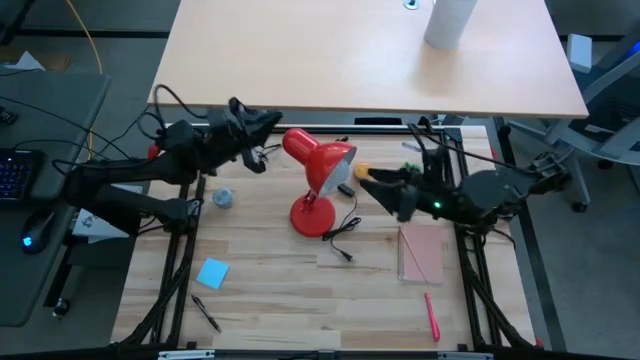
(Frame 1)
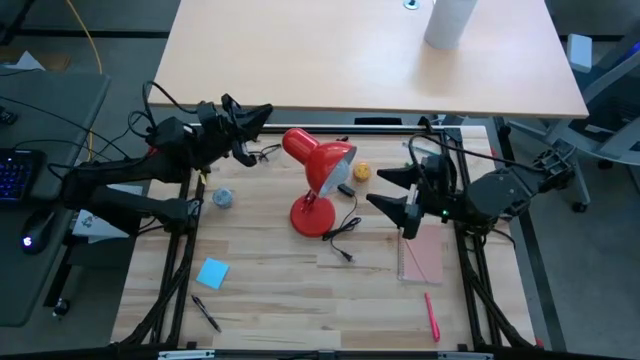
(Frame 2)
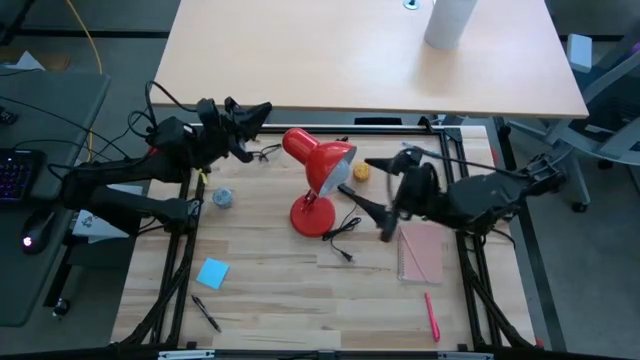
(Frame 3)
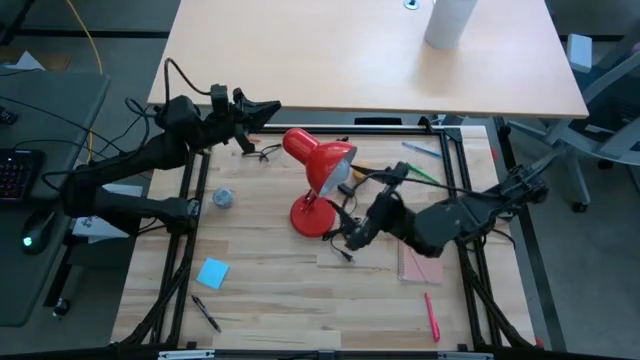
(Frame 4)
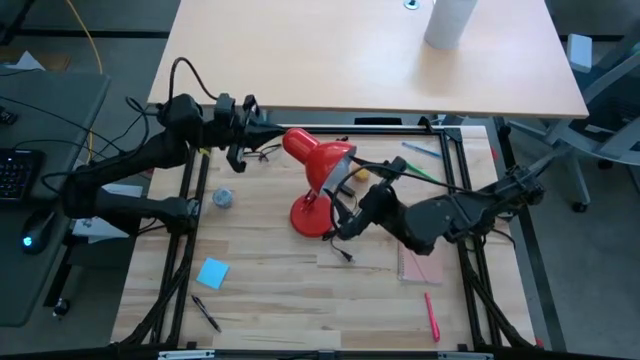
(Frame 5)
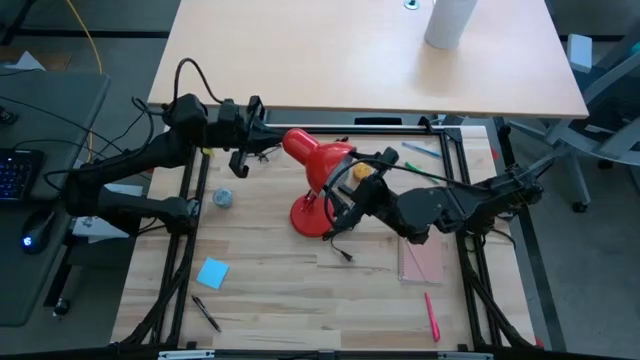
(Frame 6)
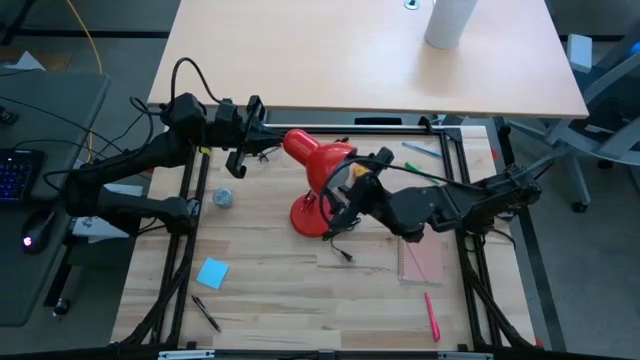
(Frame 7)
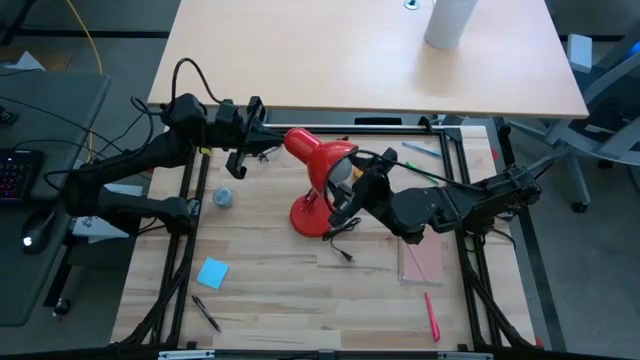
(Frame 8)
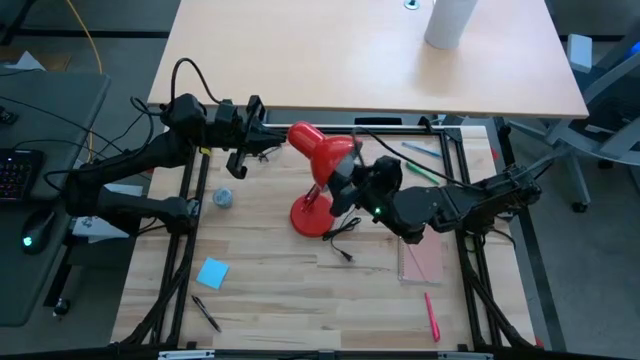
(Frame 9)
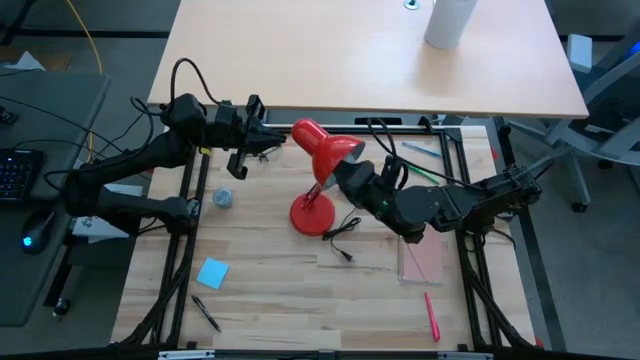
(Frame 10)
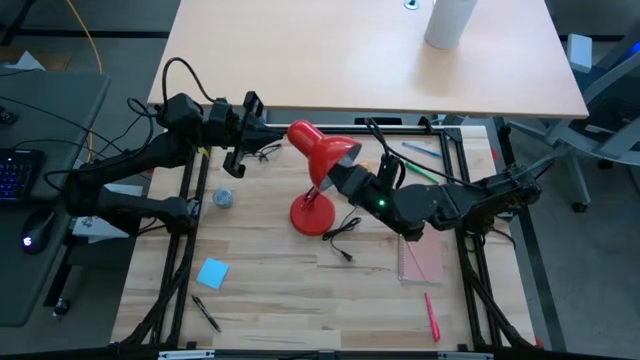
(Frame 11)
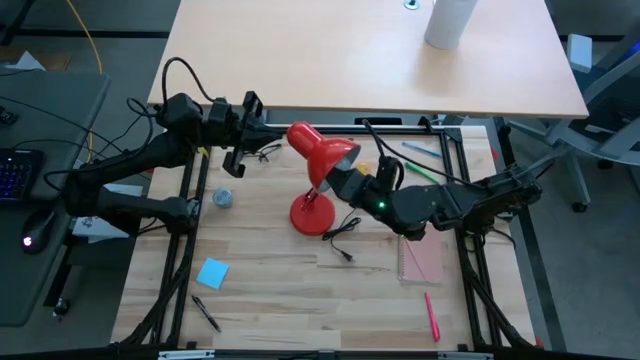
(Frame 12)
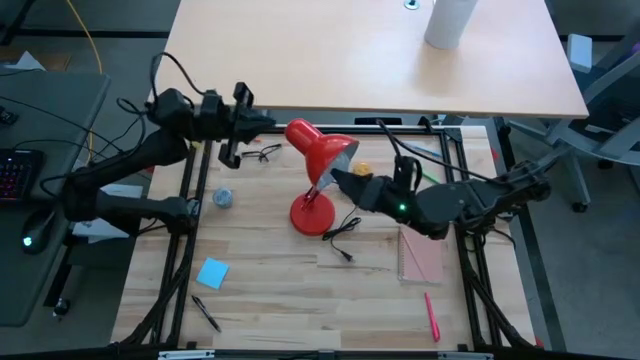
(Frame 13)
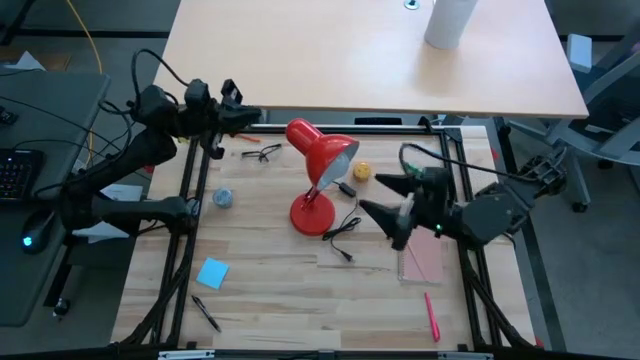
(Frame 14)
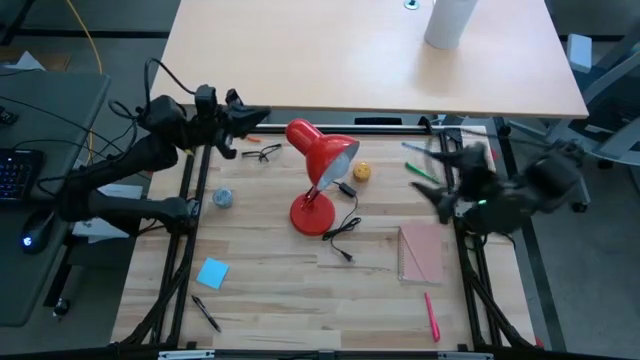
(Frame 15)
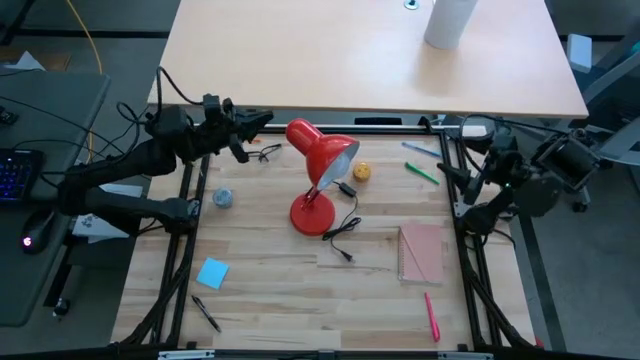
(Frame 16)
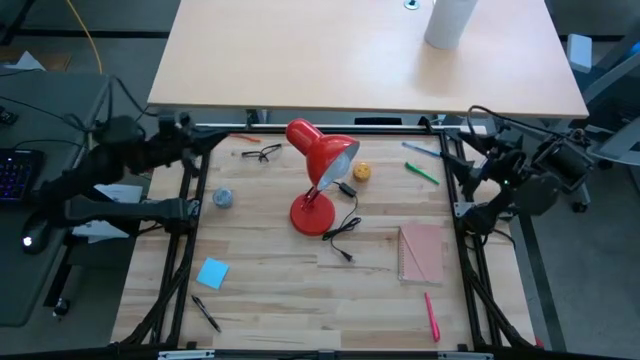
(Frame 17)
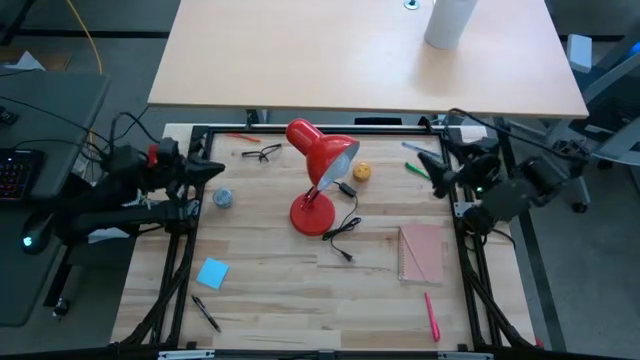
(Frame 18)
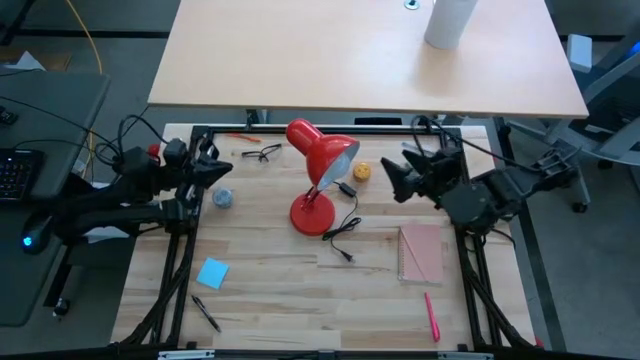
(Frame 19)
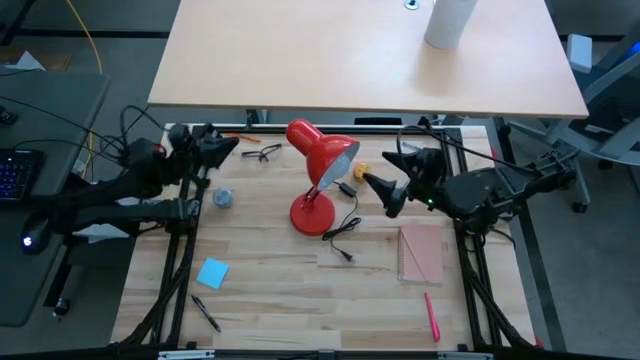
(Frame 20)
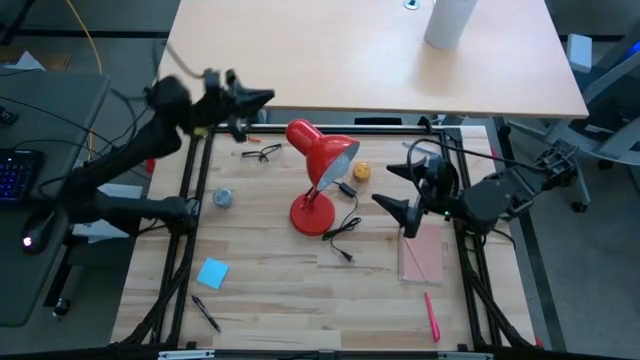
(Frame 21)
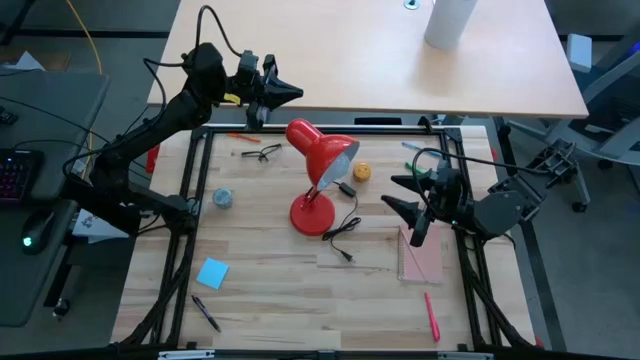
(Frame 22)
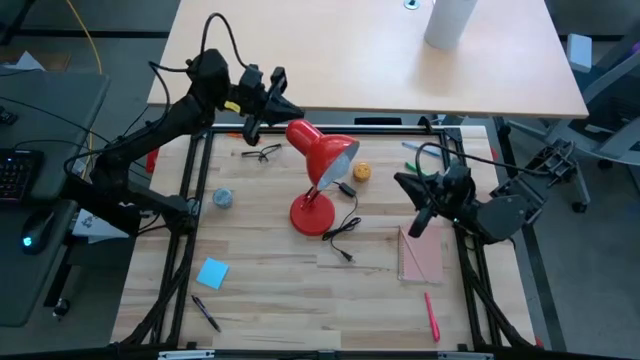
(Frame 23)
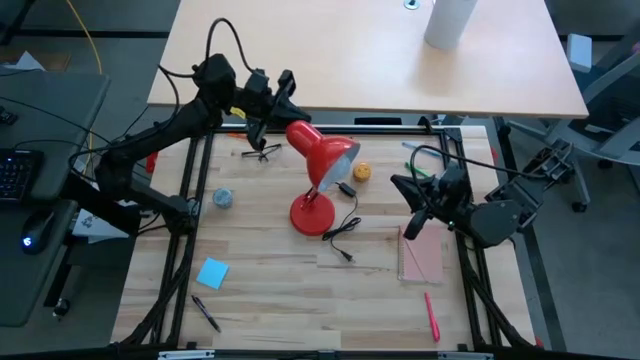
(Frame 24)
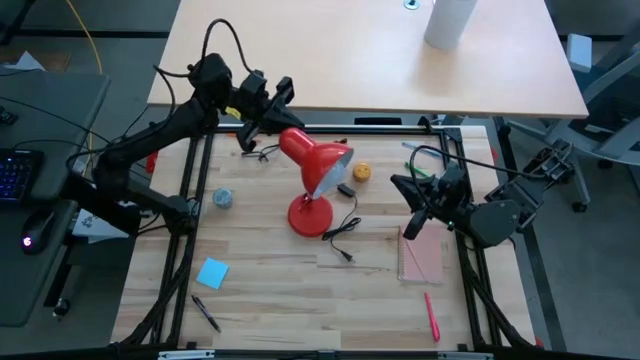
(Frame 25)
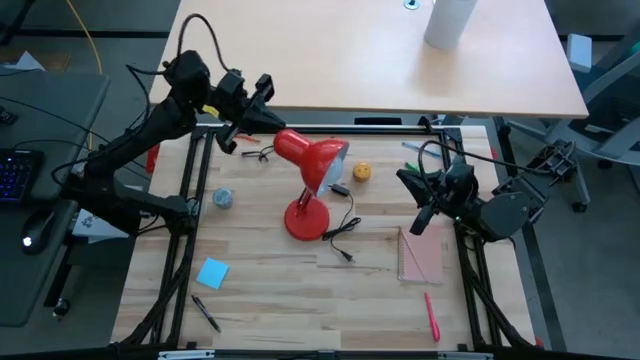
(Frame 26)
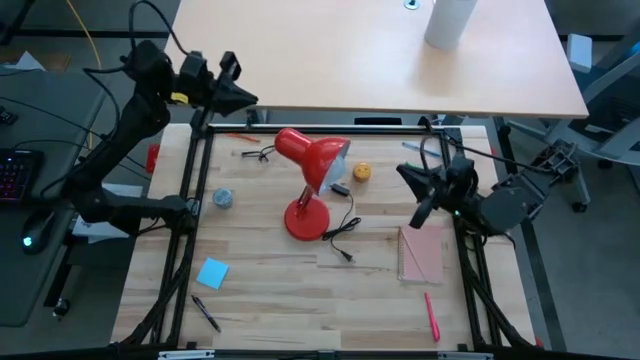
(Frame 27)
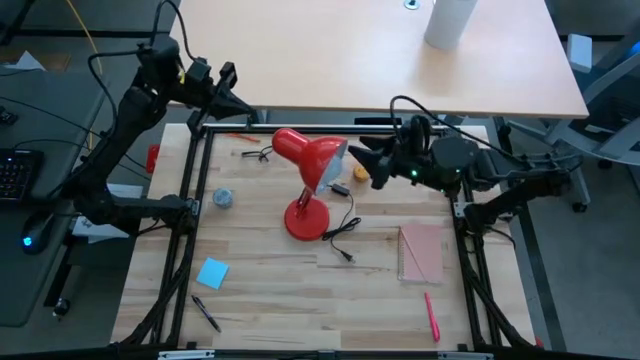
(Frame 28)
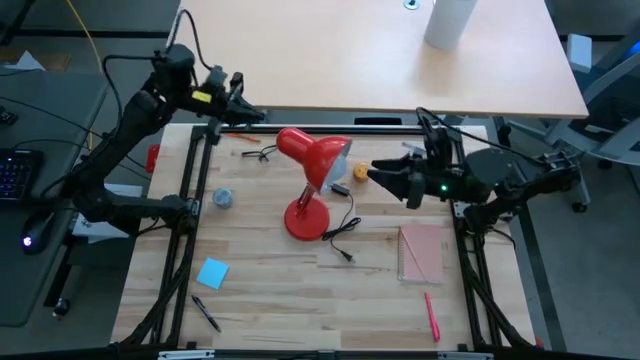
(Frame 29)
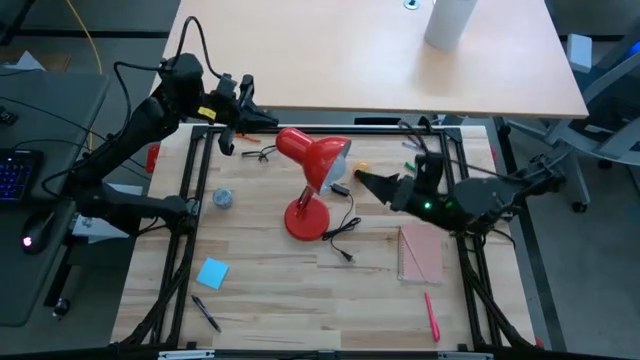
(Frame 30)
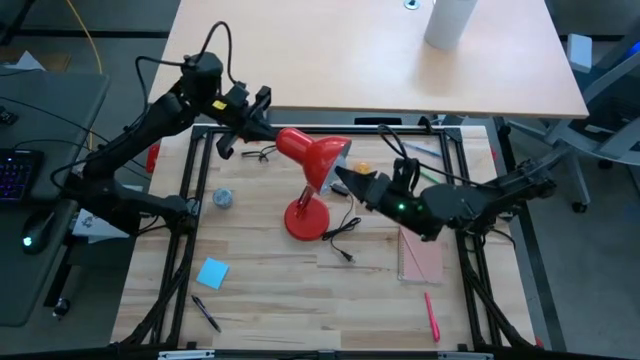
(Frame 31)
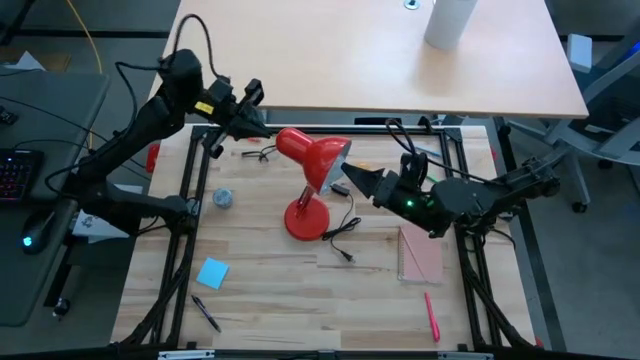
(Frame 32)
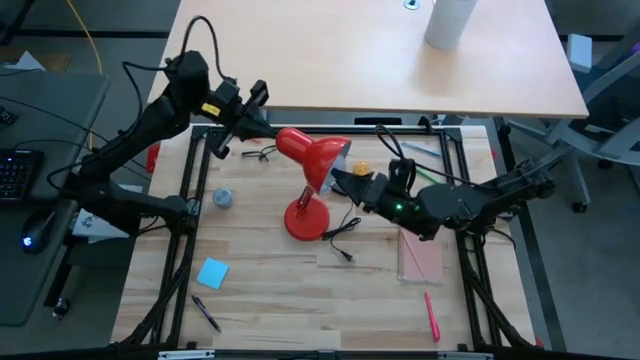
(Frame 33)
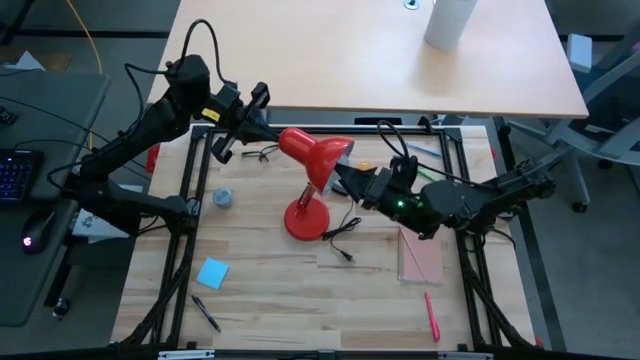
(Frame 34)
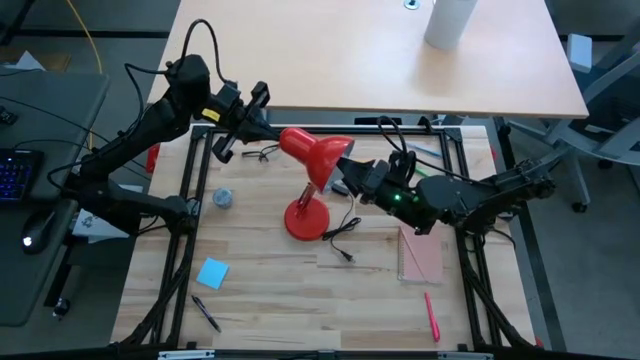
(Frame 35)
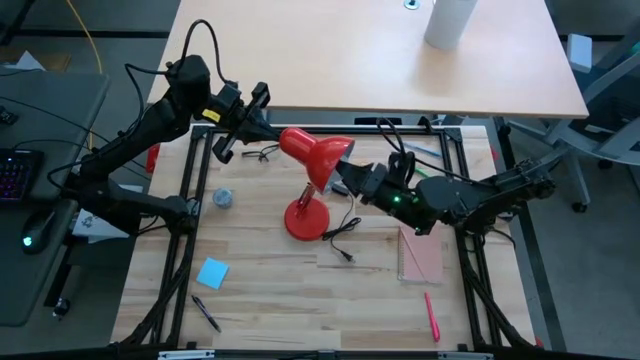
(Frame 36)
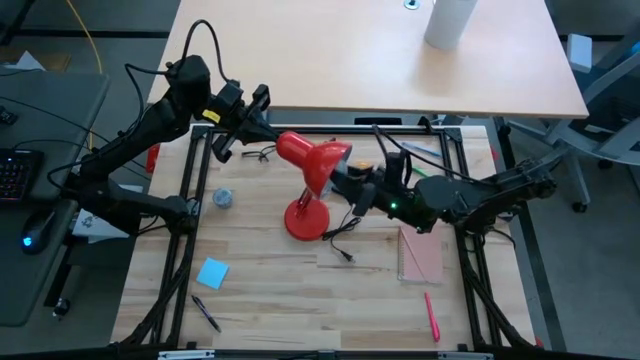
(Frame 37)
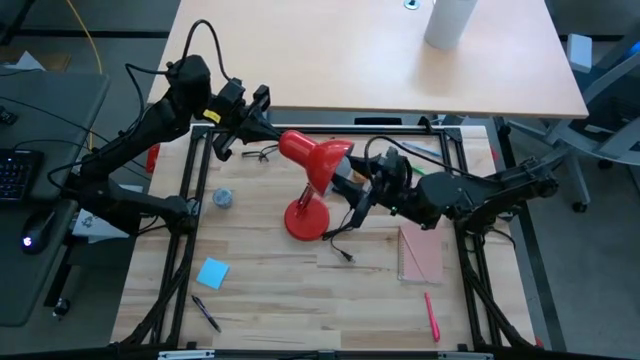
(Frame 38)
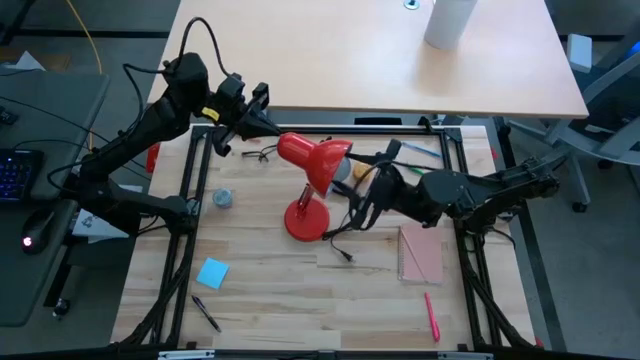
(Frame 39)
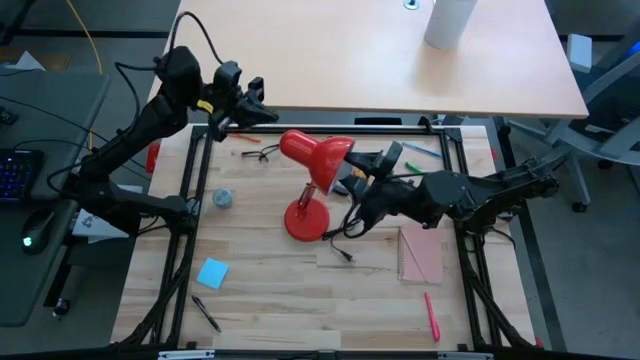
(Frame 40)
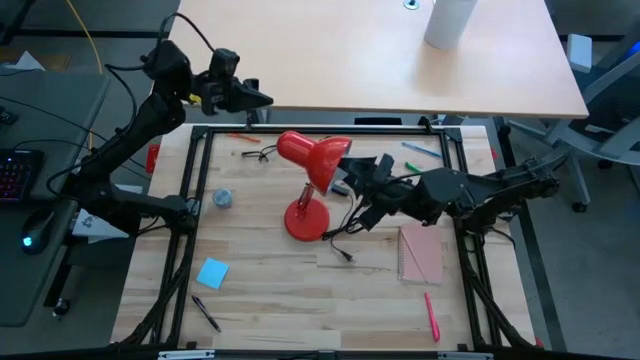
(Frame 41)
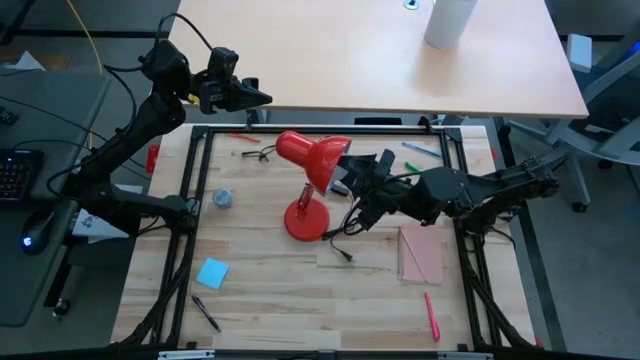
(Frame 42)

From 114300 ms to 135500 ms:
Task: Screw lightbulb
Insert the lightbulb into the lamp
